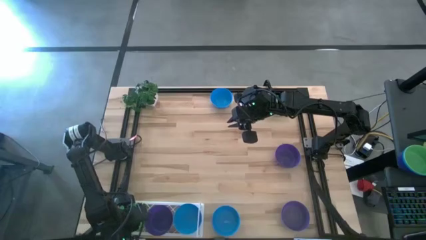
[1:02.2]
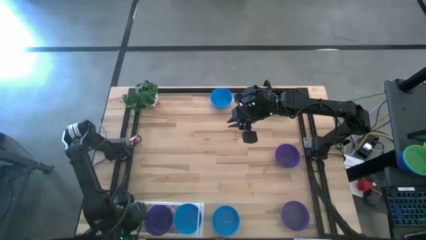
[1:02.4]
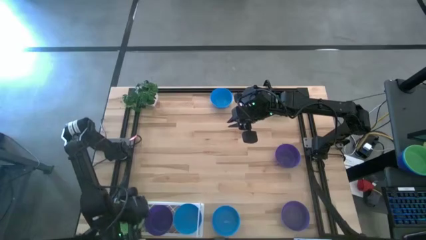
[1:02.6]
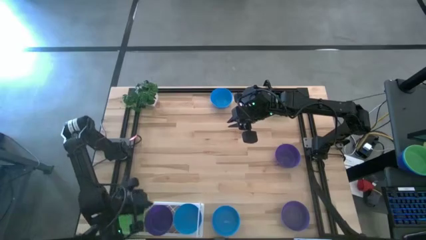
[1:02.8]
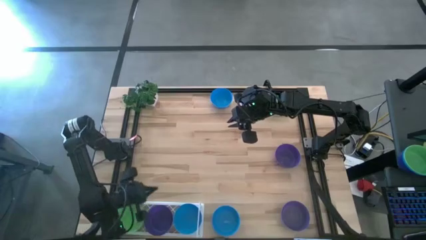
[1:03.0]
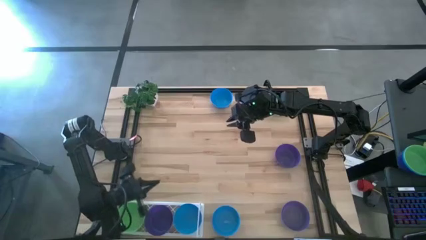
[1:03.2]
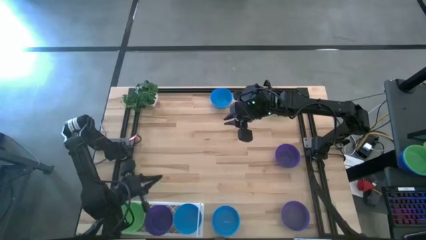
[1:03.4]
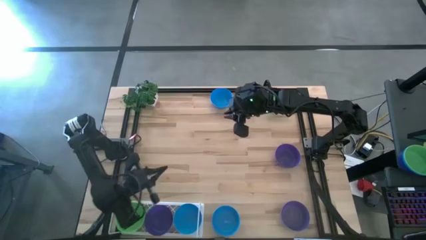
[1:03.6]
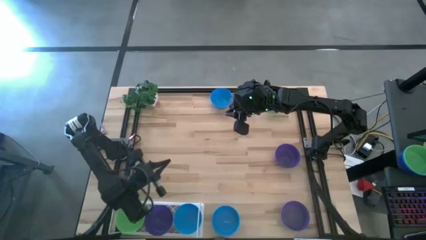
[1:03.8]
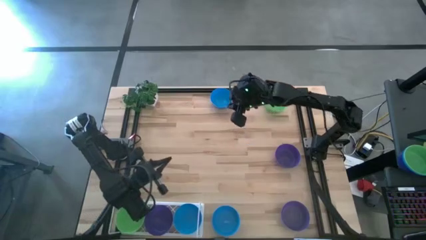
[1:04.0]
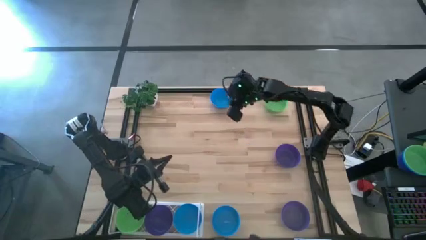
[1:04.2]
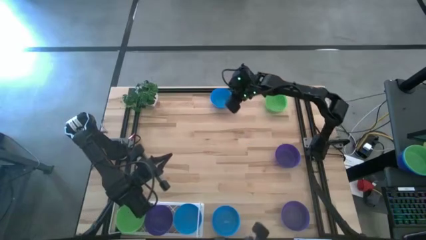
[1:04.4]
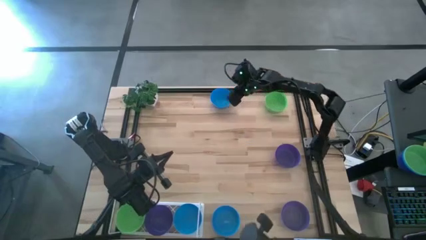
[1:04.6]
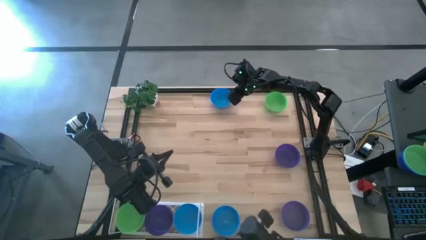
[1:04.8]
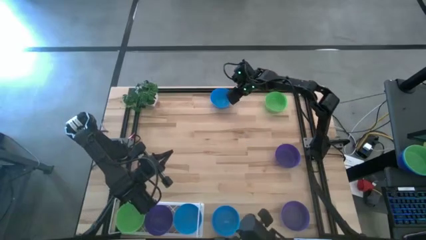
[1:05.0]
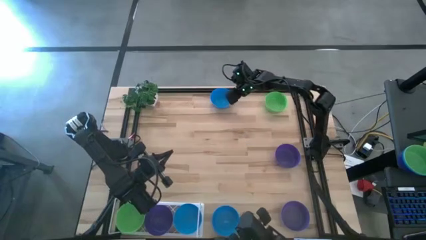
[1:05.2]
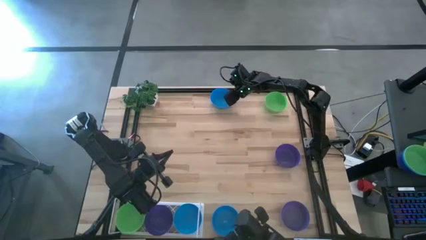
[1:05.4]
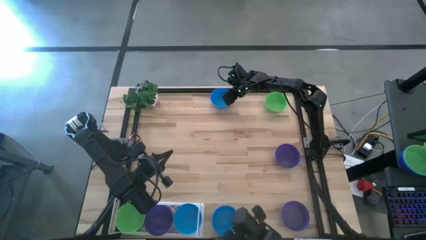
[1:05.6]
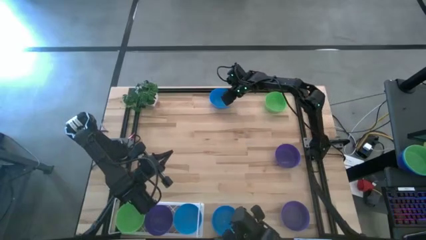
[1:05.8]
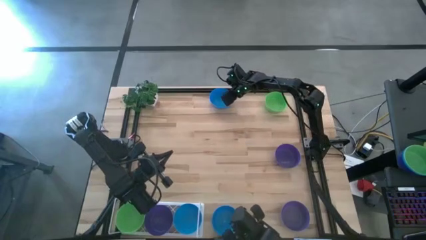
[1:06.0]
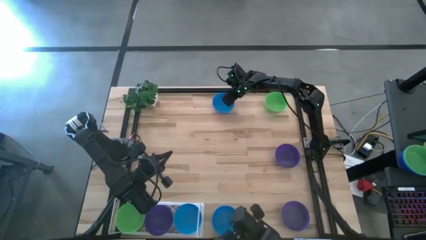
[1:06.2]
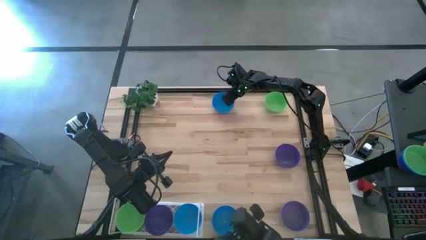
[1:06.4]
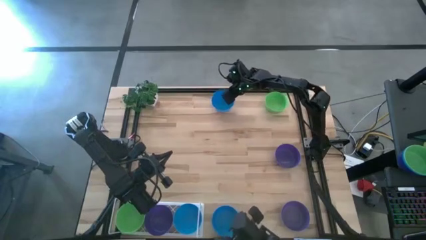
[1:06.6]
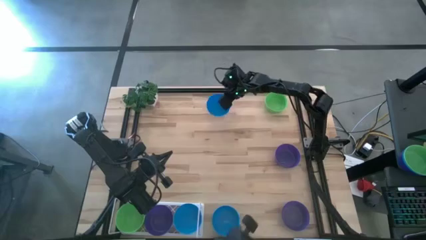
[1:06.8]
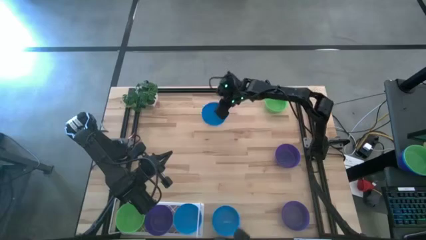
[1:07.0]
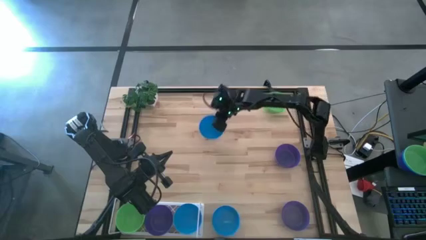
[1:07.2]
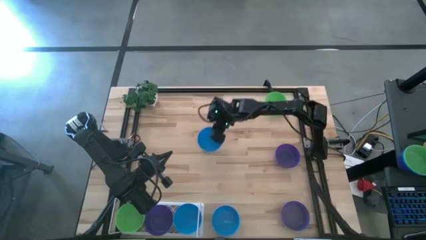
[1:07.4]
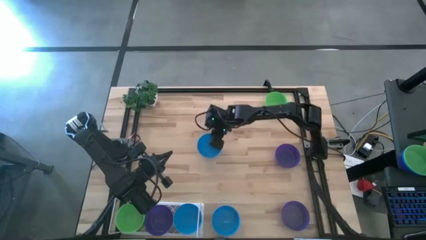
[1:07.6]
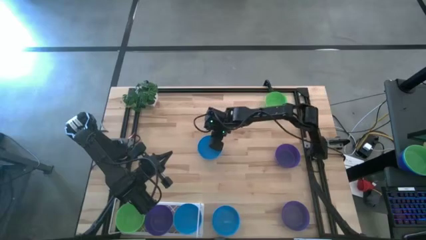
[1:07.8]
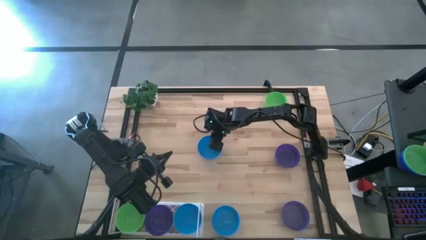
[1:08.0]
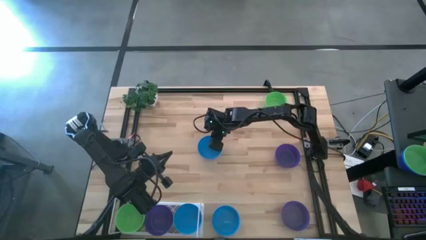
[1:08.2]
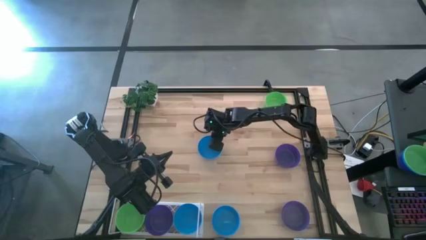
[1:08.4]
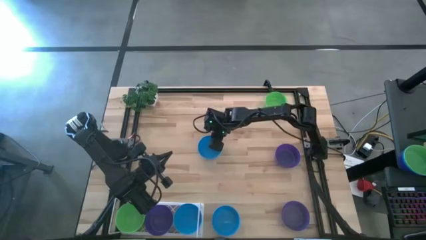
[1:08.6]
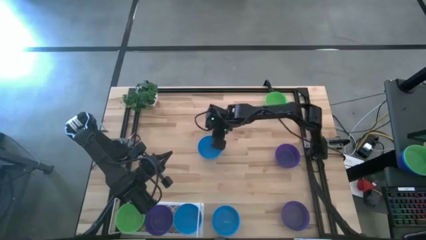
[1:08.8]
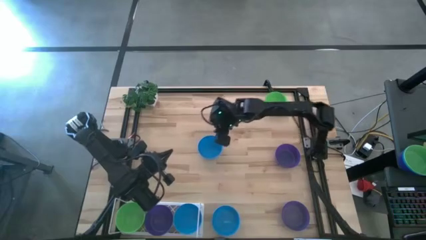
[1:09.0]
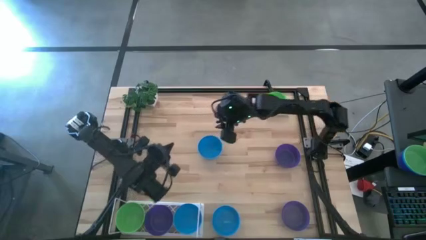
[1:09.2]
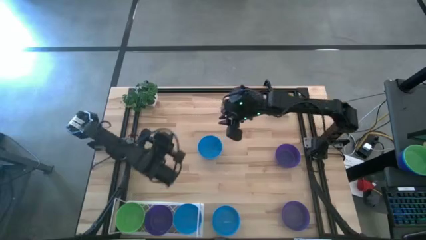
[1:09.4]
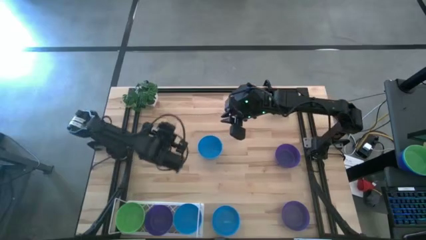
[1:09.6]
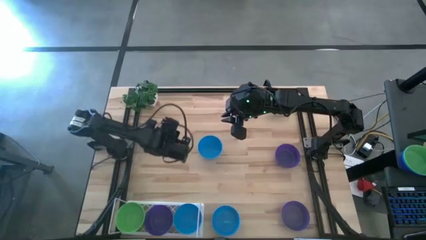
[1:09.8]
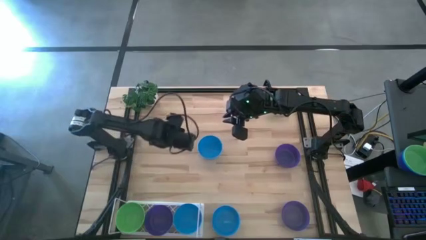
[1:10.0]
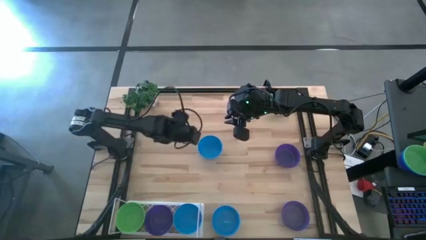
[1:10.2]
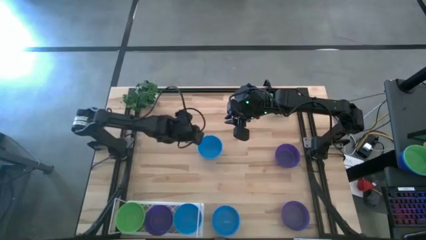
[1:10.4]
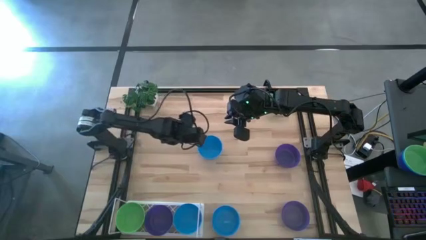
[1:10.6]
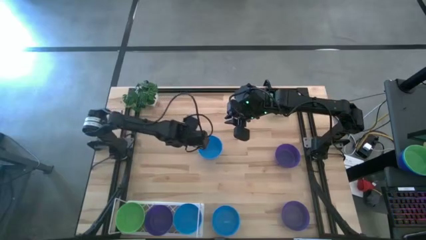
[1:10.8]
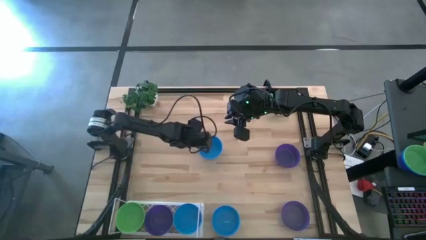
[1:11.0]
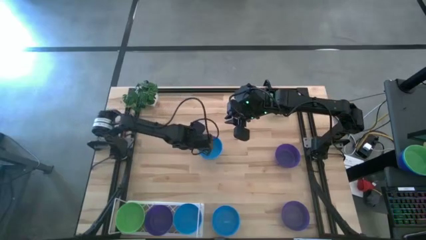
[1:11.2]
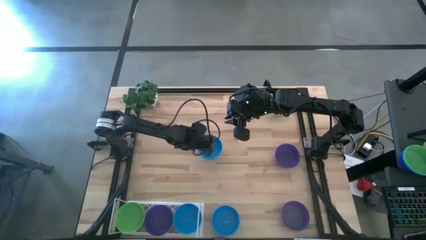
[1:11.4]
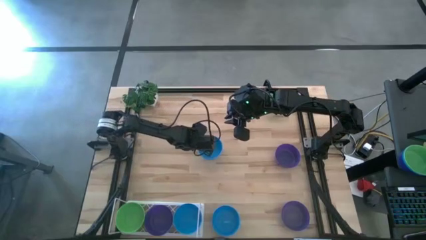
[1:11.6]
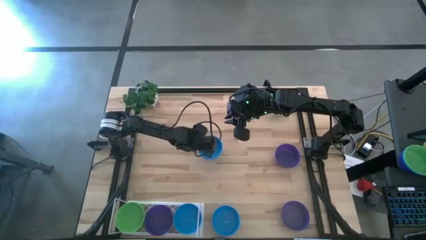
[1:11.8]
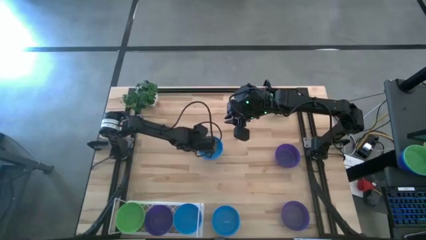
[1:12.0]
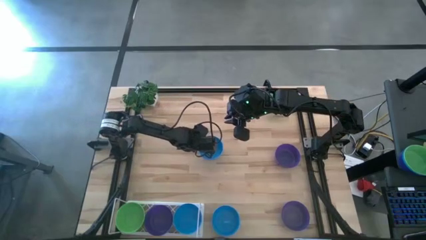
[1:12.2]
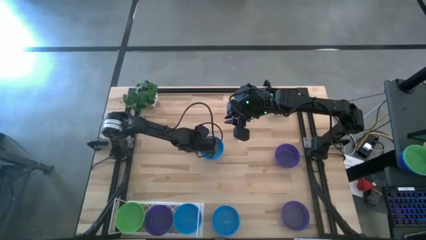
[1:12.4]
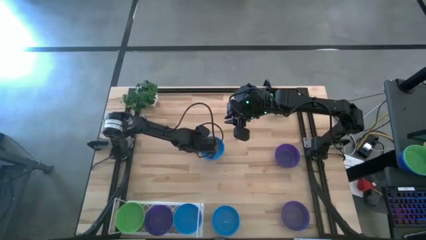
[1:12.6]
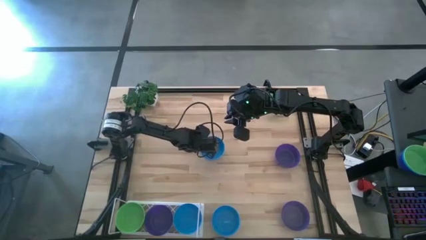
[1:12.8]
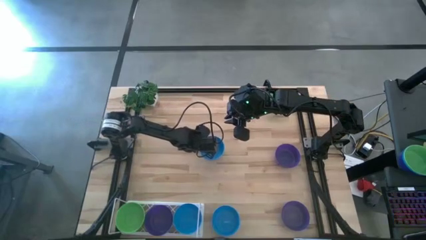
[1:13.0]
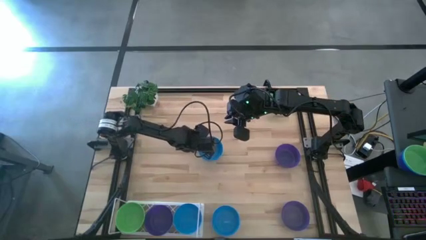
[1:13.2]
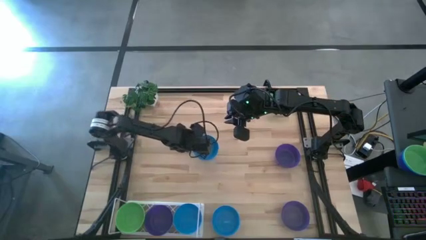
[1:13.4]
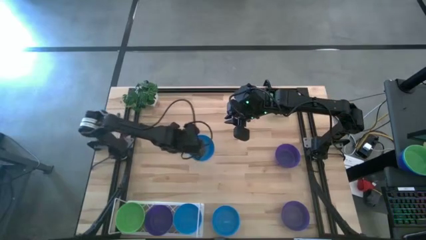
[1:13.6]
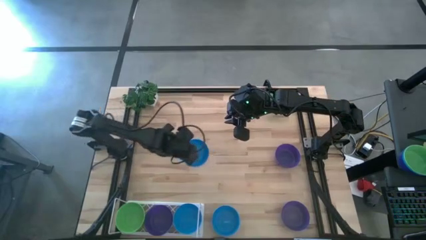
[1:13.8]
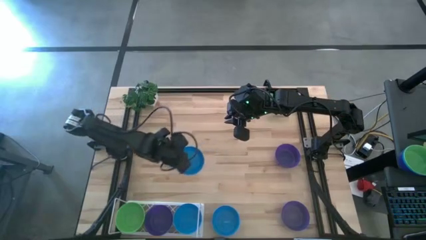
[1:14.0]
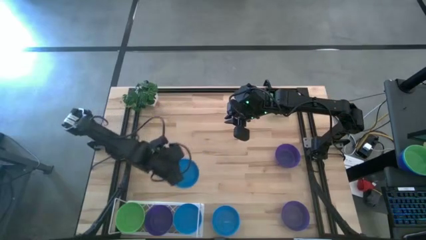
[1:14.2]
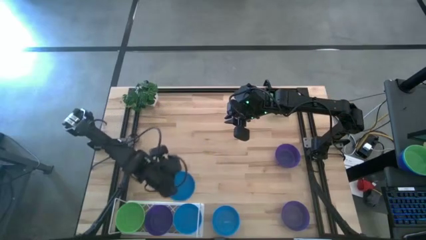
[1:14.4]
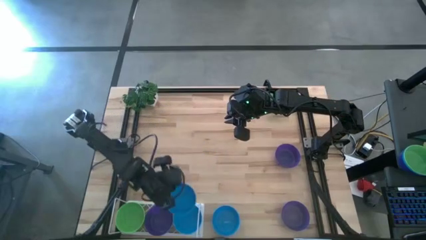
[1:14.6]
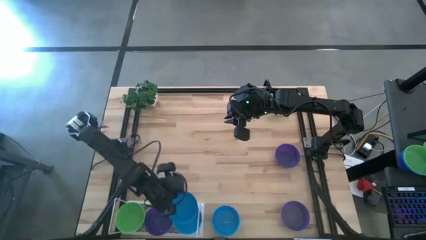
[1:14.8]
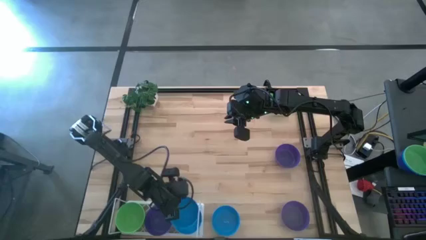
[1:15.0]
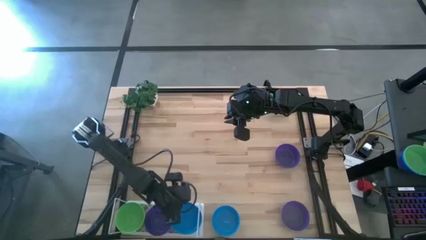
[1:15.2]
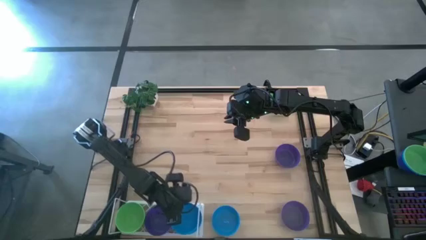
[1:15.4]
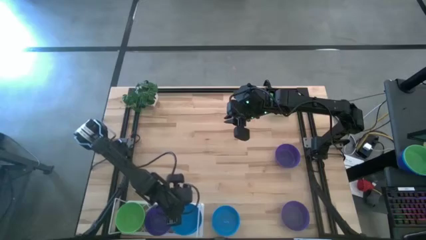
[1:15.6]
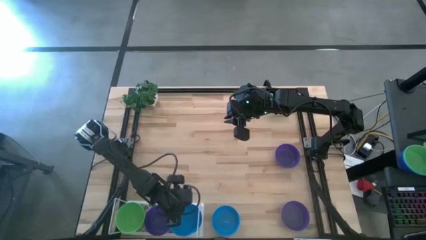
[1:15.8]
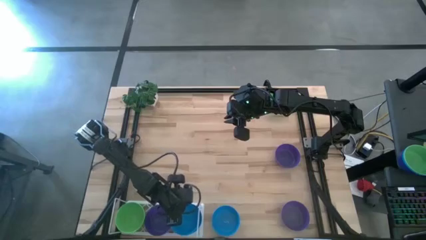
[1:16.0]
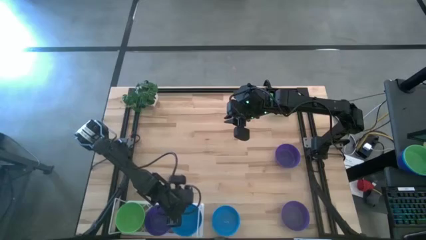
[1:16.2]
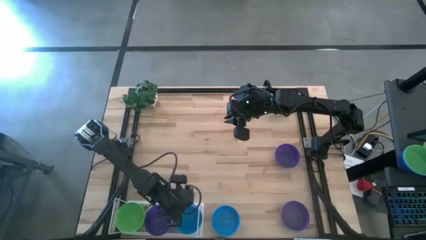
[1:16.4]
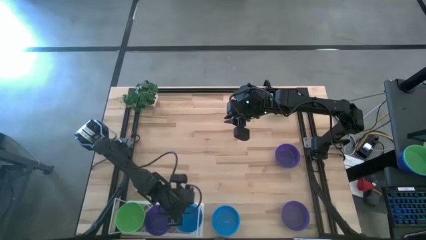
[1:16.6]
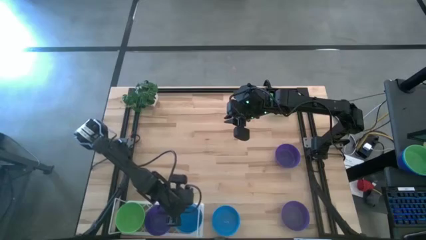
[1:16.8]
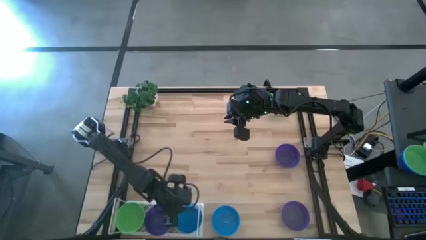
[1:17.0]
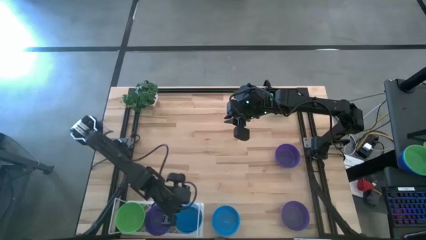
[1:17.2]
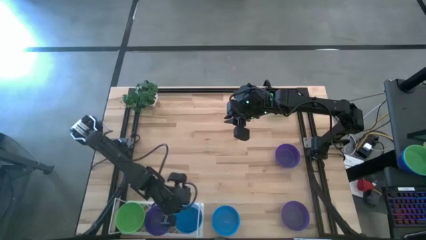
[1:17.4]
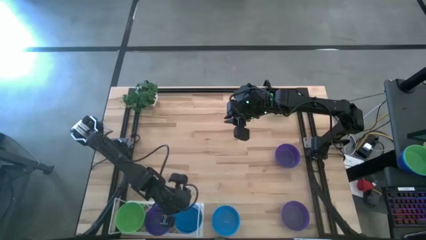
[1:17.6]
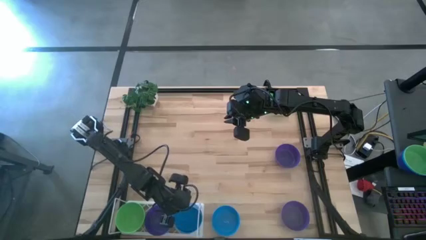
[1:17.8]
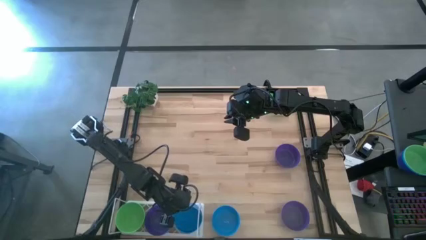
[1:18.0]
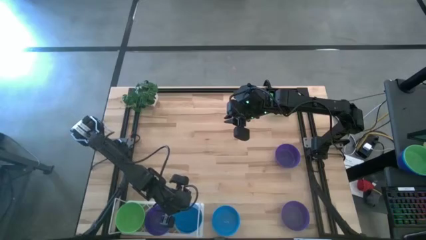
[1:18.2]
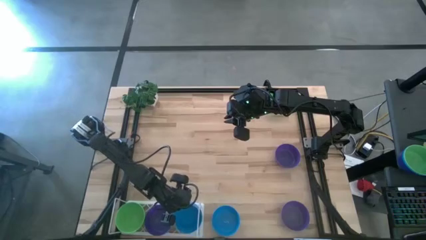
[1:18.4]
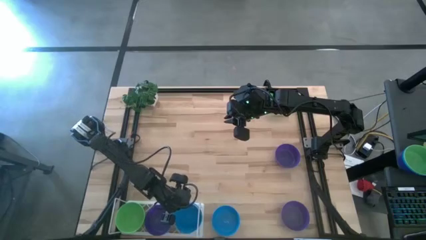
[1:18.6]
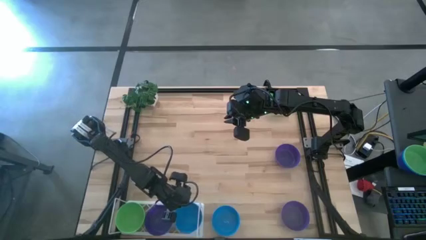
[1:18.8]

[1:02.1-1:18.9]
Task: Pick & Place Mini bowls
Stack the top light blue bowl on the light blue bowl on the shelf
